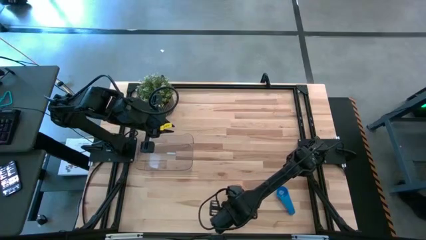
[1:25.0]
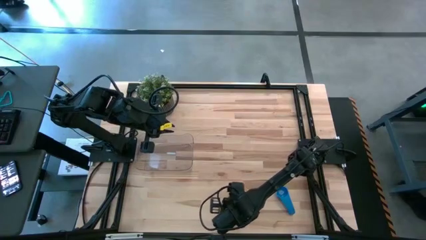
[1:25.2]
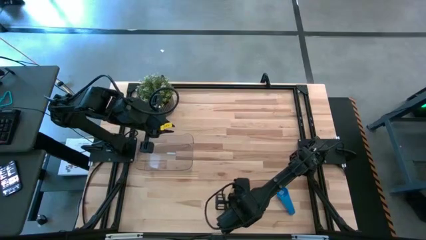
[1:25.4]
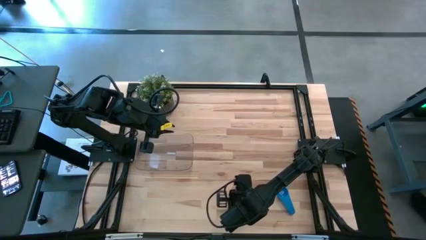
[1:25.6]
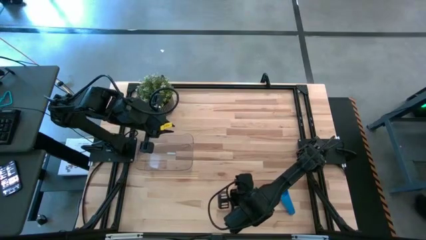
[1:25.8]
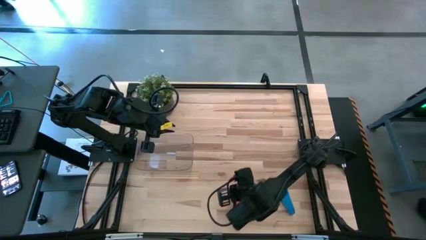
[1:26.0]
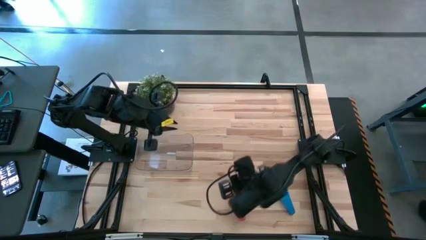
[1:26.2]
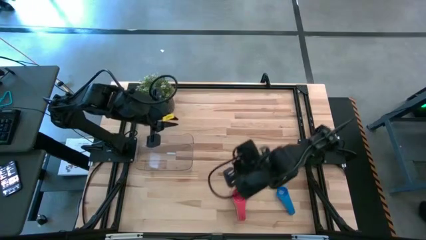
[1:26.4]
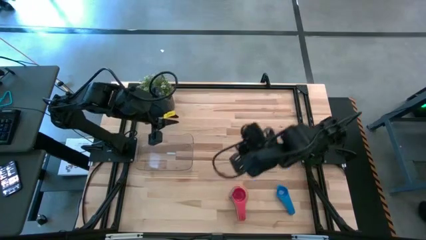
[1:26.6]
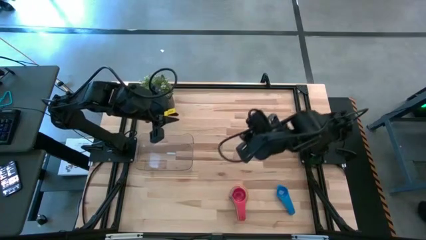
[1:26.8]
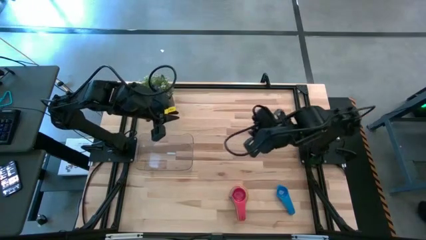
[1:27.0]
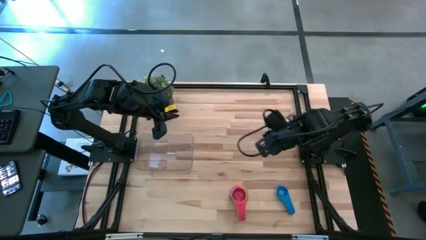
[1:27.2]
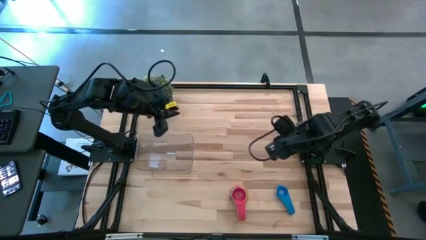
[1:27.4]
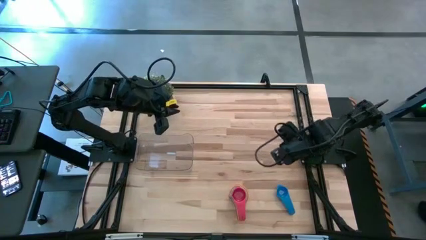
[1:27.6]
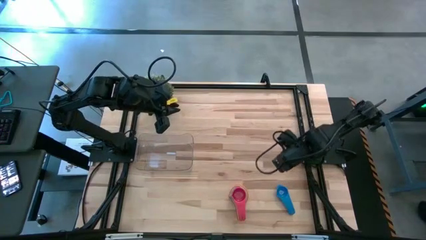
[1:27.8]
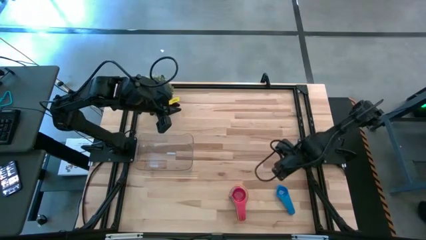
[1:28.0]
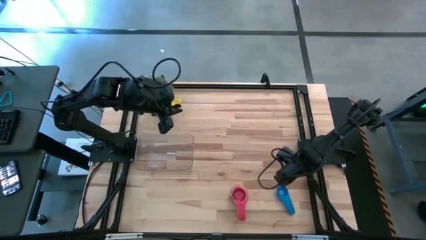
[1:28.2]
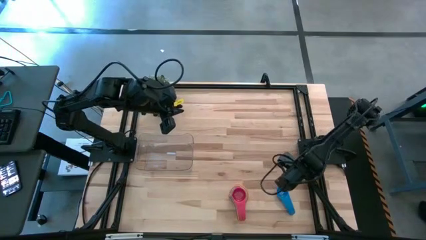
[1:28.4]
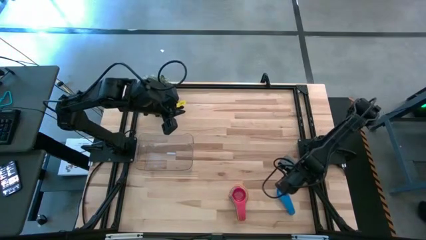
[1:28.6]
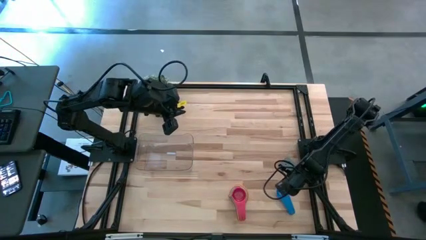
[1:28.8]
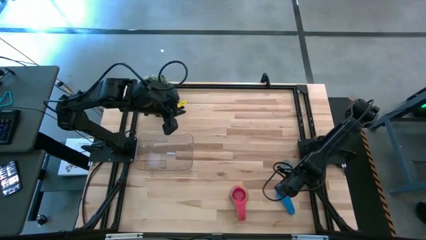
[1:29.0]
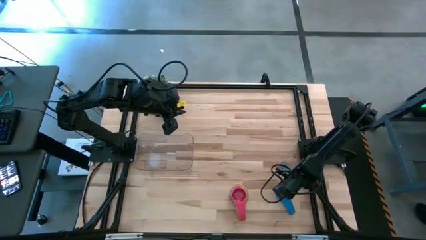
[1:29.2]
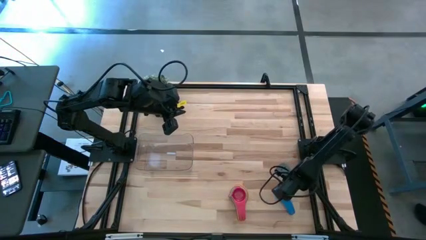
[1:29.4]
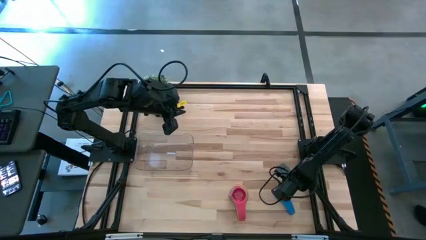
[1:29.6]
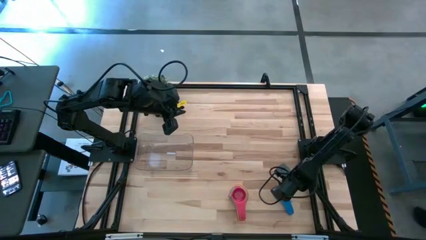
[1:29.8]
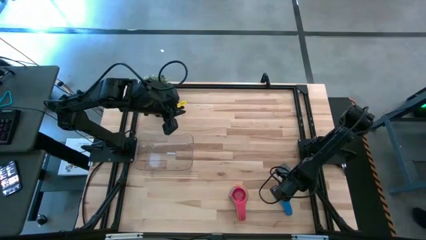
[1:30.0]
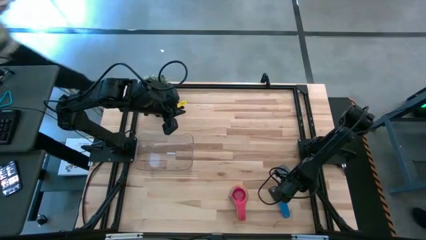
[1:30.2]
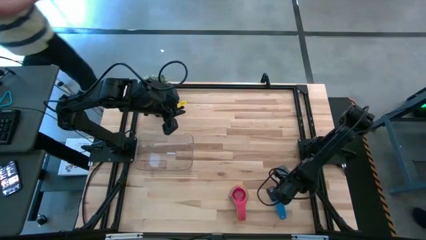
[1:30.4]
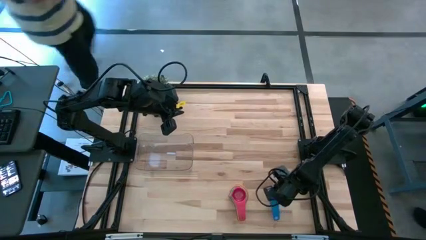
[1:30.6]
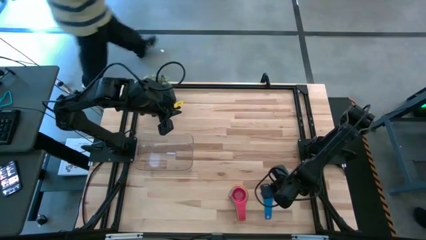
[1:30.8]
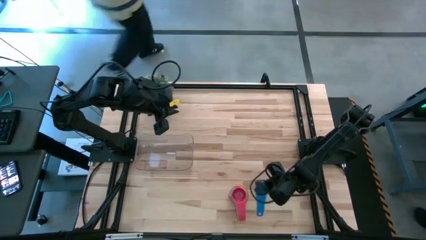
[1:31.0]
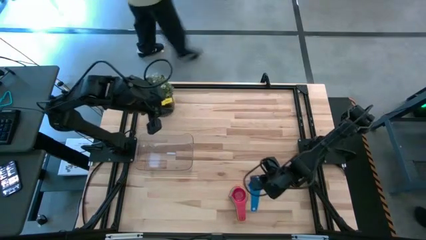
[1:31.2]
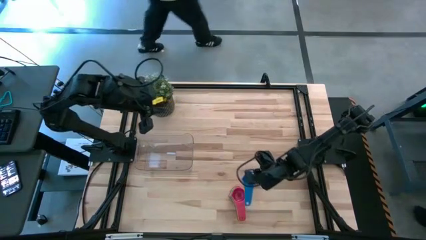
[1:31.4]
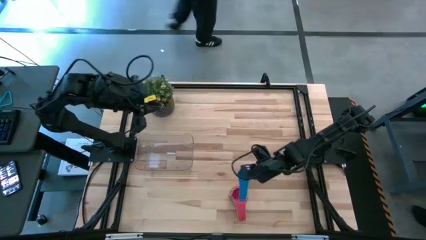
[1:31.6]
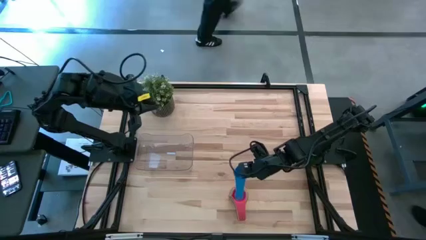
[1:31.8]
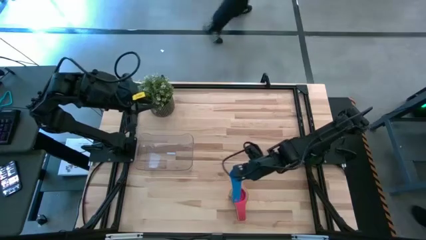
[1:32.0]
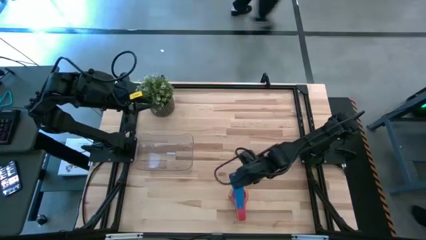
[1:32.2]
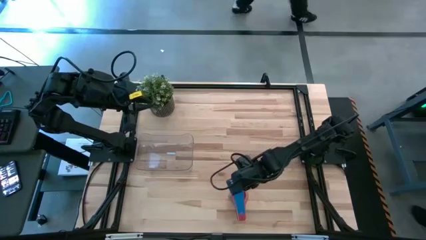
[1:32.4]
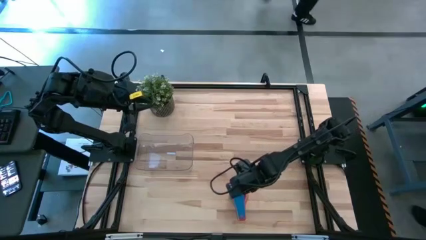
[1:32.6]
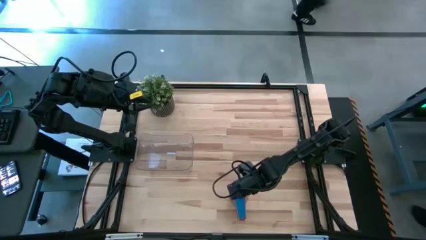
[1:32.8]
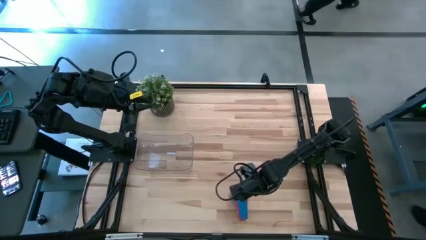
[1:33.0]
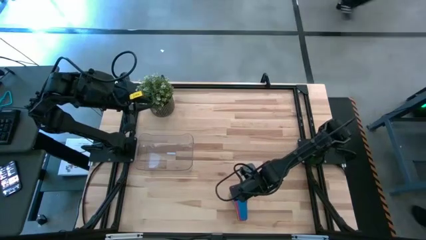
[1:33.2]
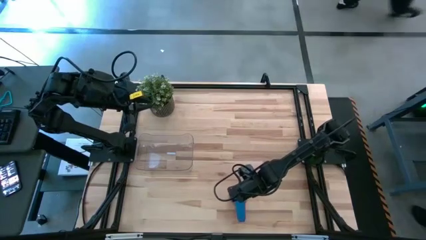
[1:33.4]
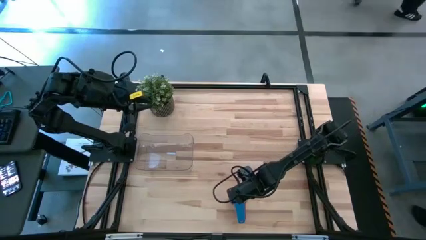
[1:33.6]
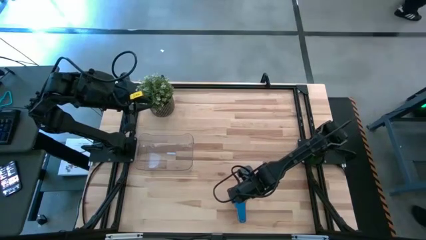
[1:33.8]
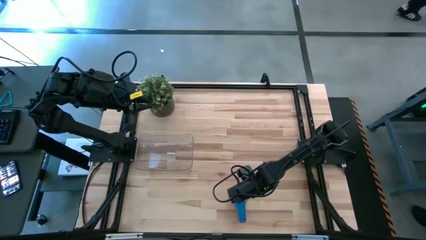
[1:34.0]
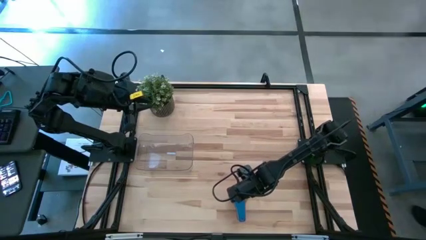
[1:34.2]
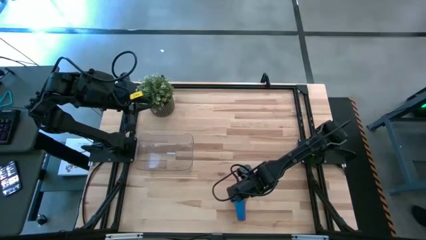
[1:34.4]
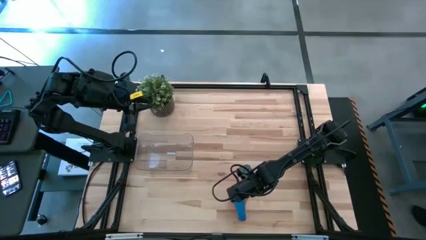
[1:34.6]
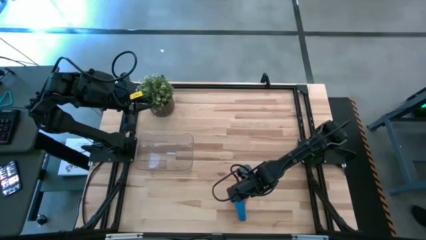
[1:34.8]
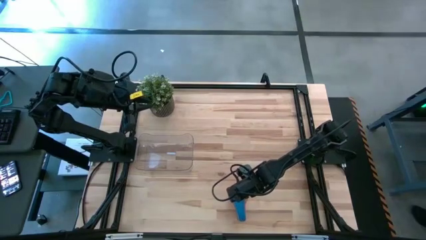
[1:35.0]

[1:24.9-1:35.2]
Task: Nest measuring cups in basket
Stack the blue measuring cup on top of the red measuring cup

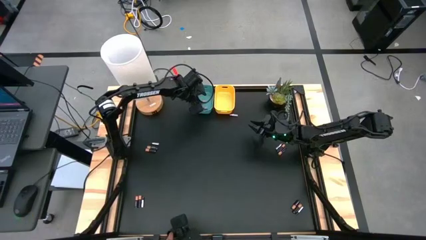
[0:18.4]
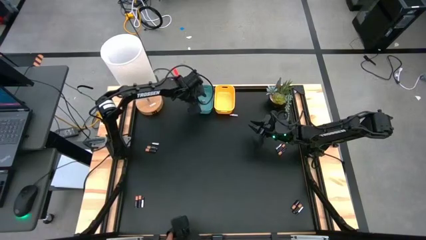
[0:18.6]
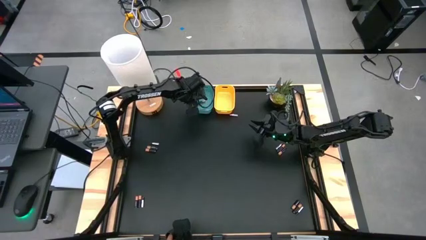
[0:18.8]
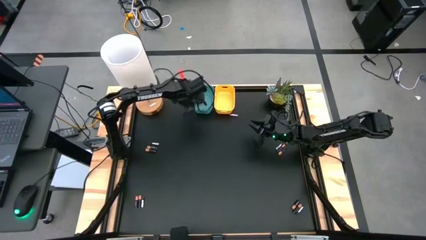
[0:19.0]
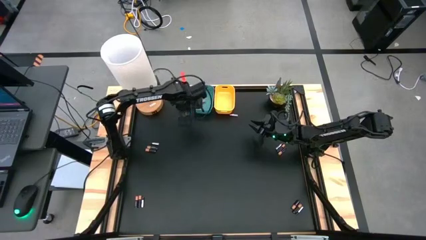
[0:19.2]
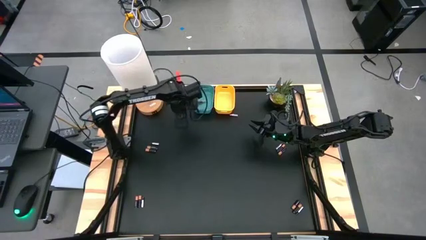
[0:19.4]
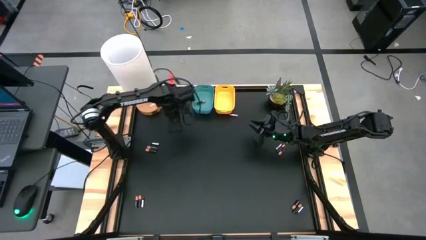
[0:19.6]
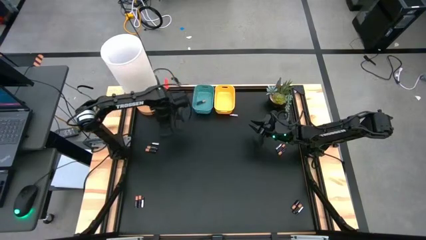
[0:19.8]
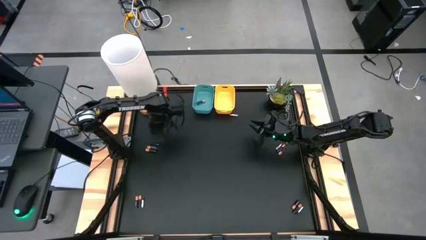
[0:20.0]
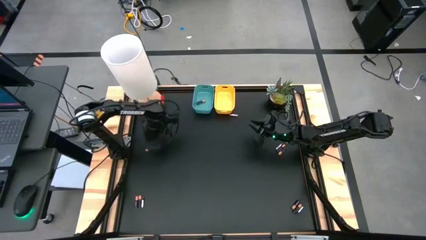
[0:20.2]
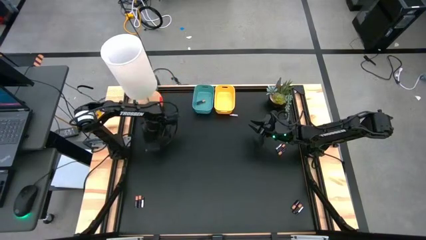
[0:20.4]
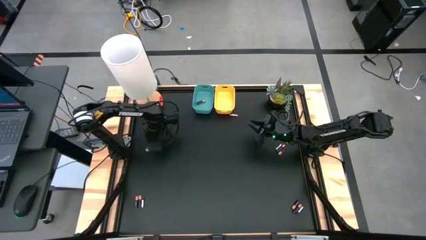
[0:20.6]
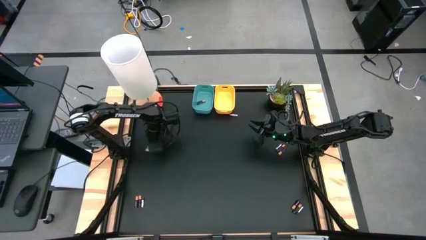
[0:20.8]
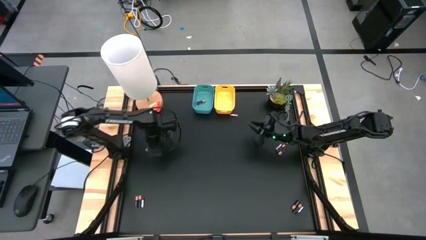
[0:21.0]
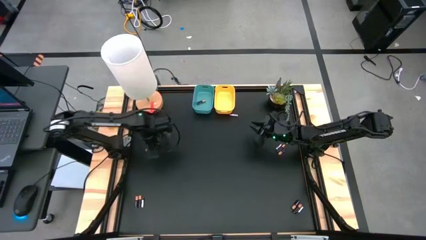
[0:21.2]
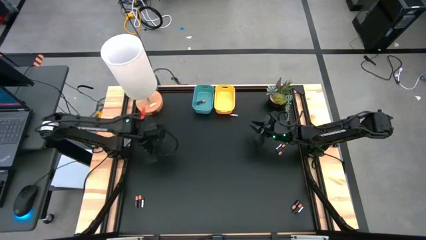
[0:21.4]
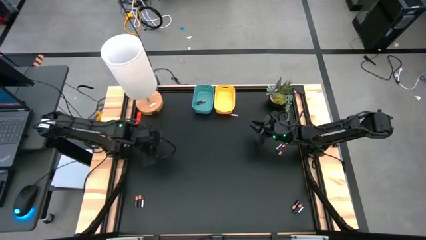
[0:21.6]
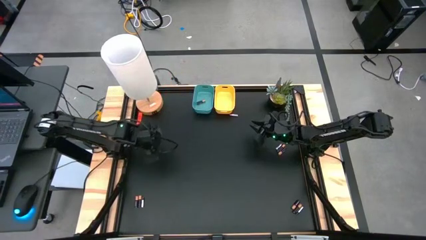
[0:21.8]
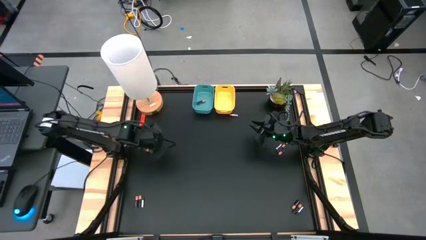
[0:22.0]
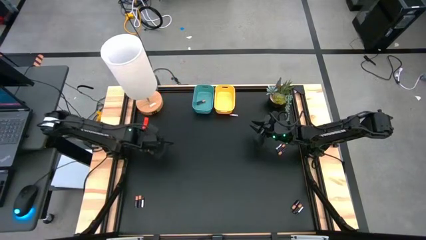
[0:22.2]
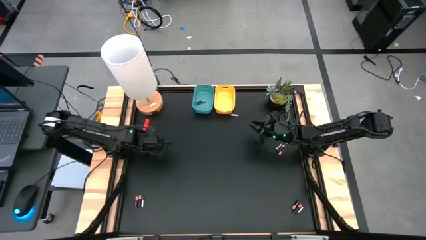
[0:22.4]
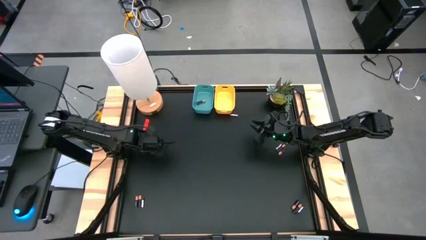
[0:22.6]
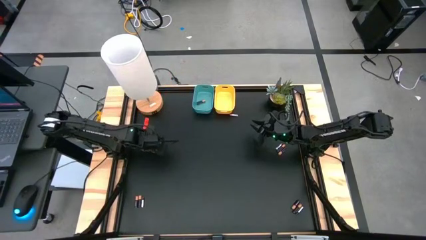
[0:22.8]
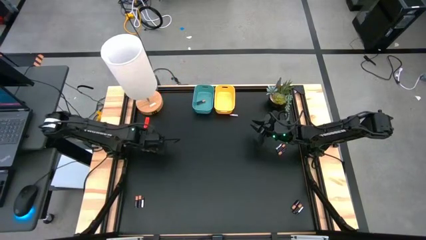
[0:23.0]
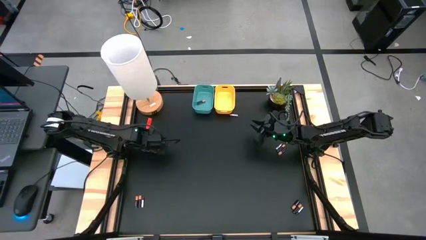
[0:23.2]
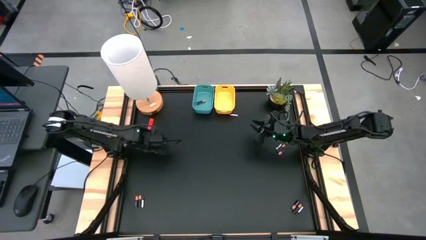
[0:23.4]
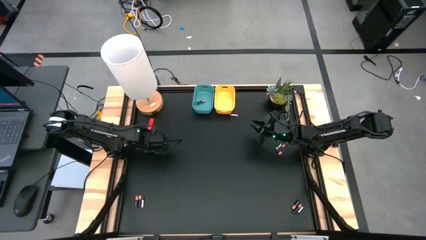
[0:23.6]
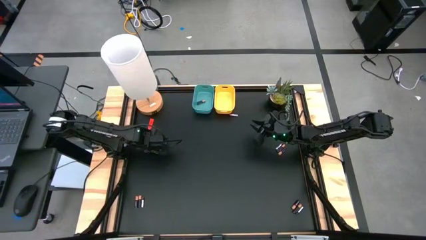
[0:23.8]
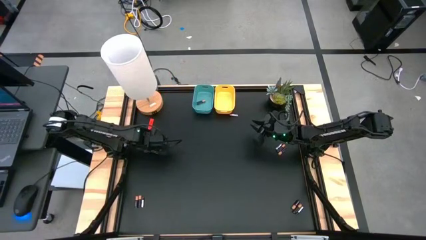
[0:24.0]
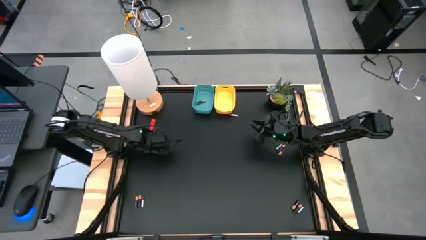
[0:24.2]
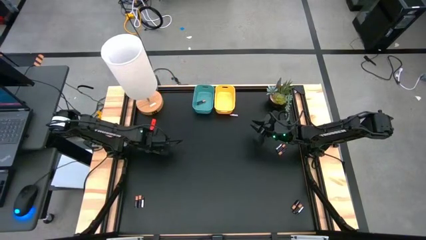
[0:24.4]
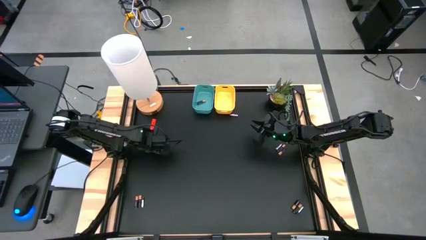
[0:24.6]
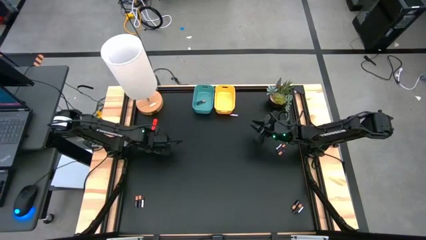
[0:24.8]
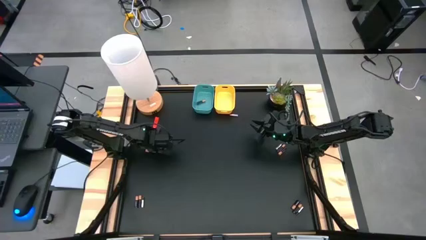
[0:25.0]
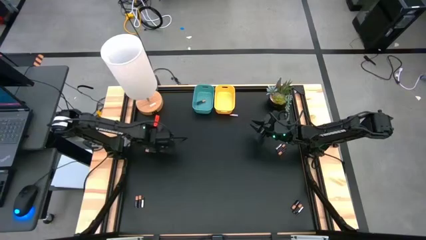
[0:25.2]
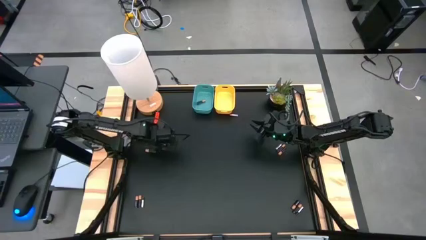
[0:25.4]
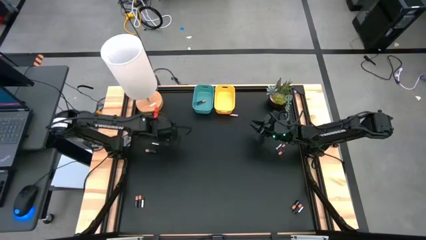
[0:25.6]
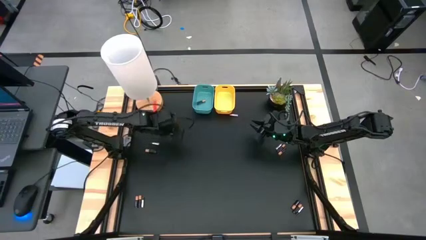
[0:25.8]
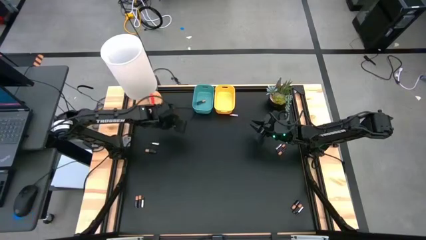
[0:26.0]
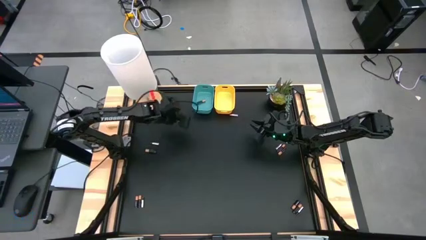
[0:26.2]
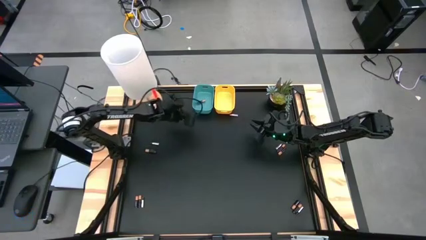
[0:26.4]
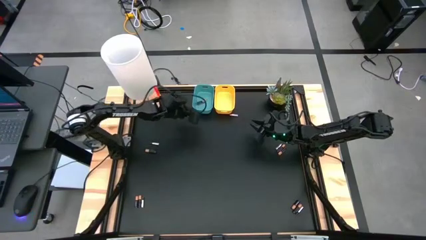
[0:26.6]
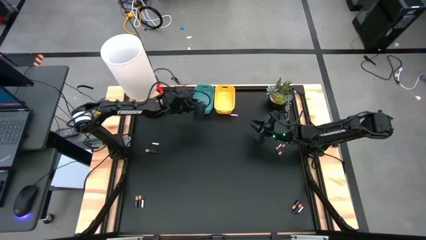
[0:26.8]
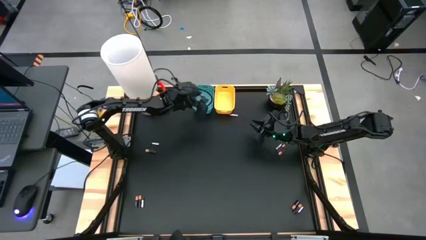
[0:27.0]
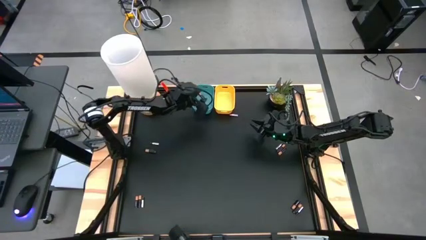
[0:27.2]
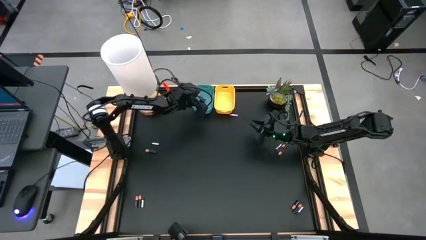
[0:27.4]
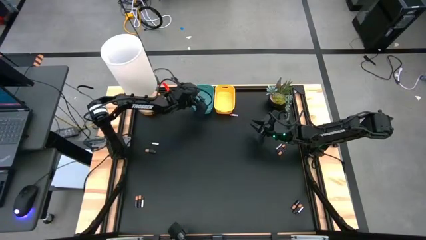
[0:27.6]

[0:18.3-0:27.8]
Task: Sort batteries
Put the gold black battery into the blue bin
